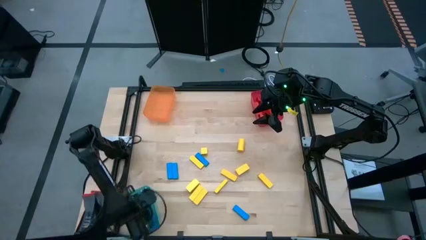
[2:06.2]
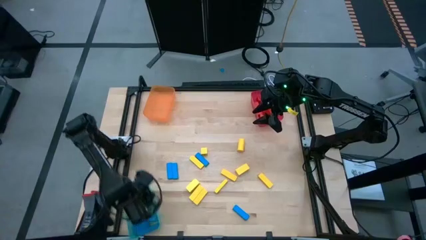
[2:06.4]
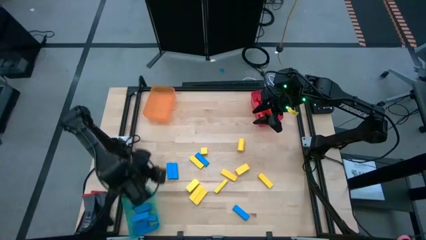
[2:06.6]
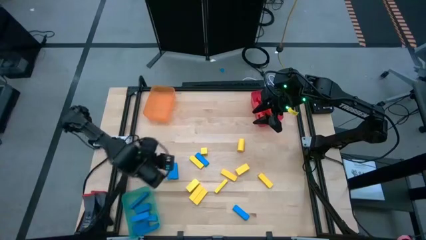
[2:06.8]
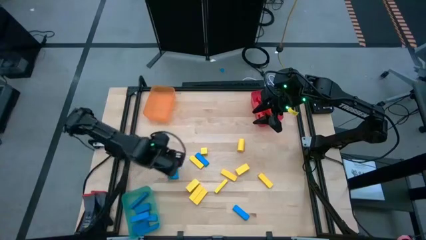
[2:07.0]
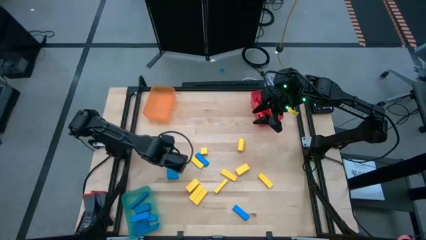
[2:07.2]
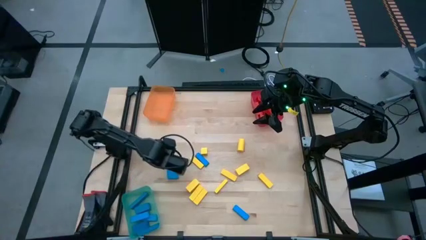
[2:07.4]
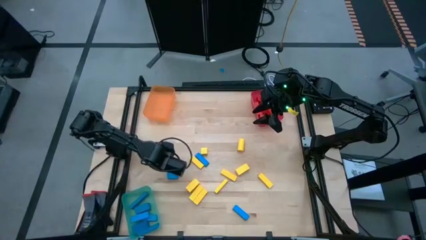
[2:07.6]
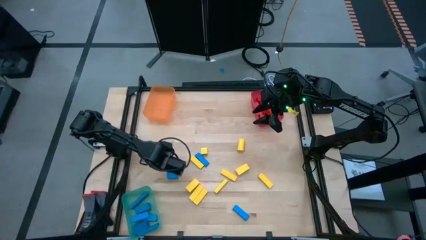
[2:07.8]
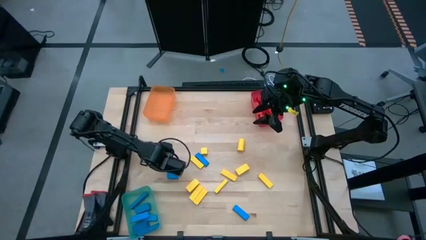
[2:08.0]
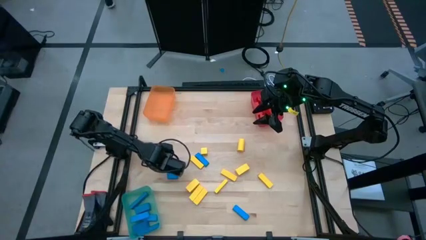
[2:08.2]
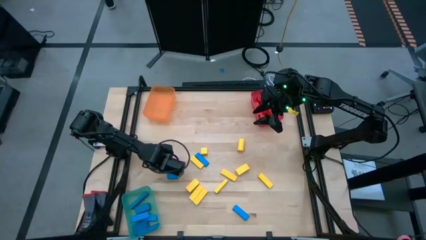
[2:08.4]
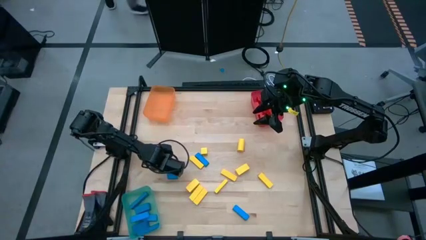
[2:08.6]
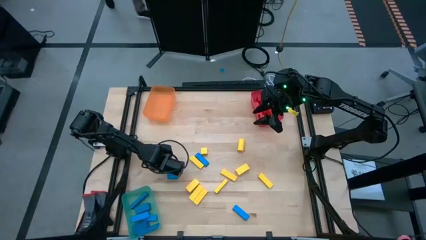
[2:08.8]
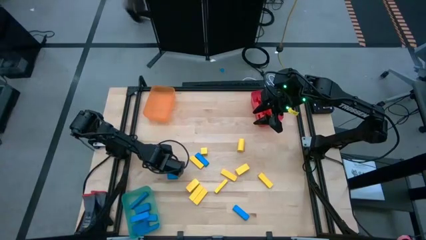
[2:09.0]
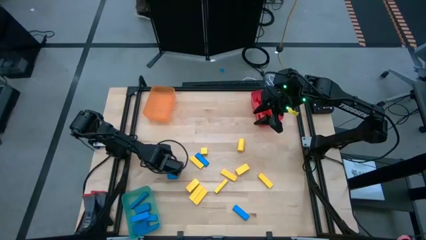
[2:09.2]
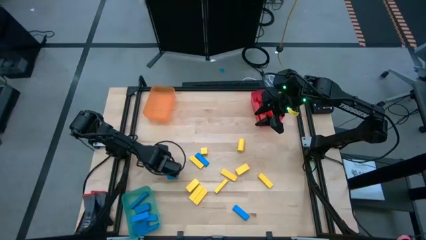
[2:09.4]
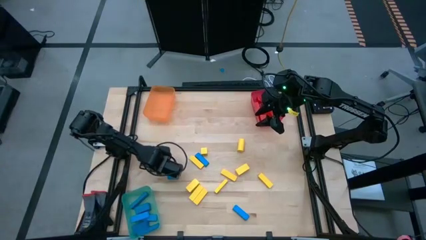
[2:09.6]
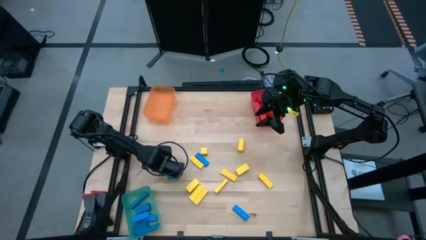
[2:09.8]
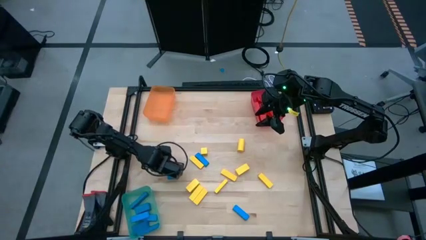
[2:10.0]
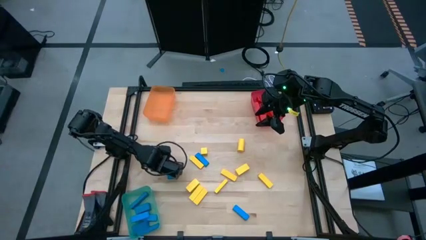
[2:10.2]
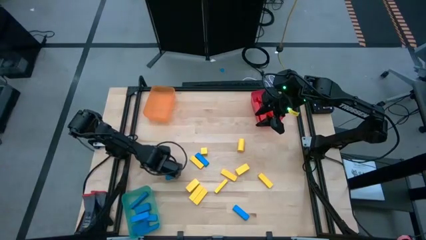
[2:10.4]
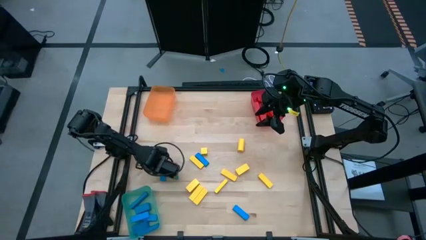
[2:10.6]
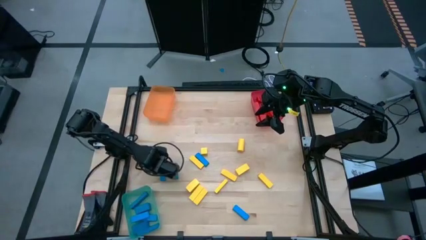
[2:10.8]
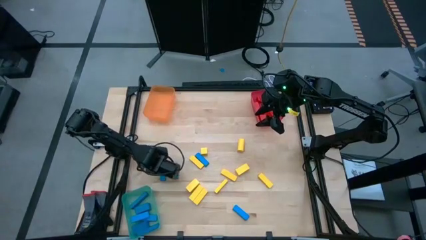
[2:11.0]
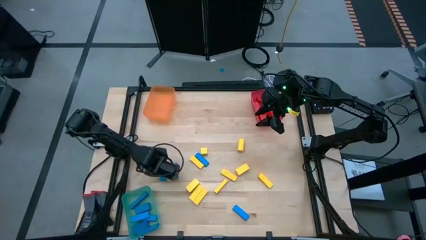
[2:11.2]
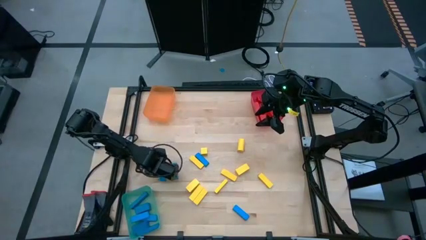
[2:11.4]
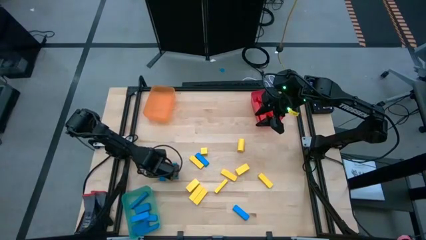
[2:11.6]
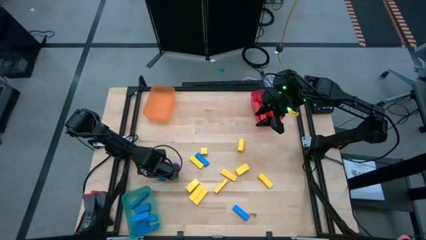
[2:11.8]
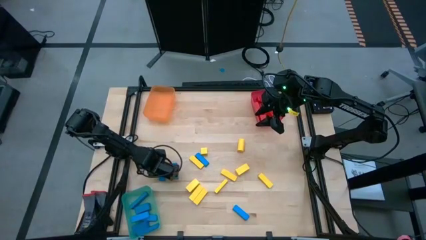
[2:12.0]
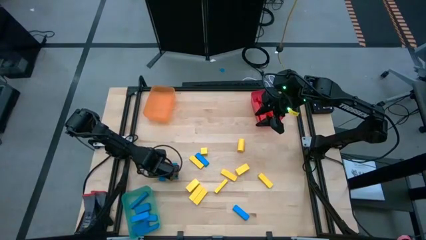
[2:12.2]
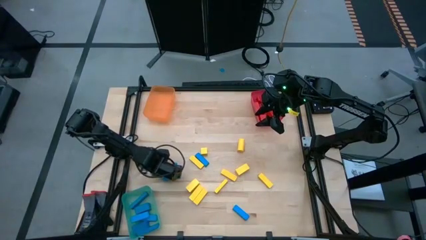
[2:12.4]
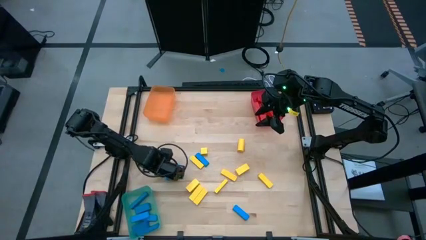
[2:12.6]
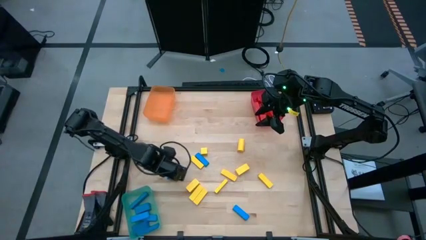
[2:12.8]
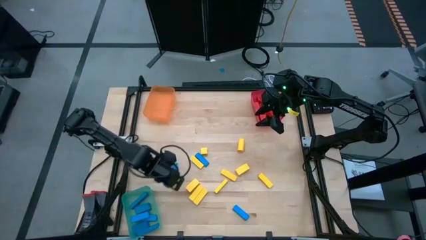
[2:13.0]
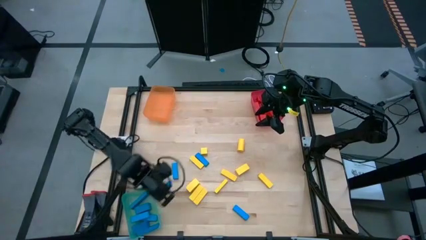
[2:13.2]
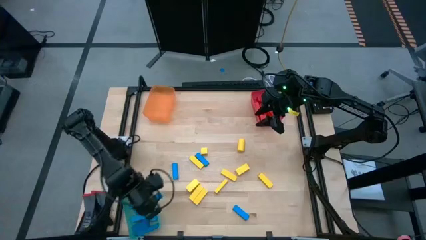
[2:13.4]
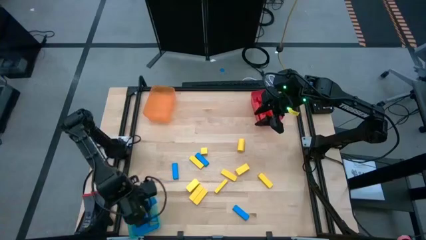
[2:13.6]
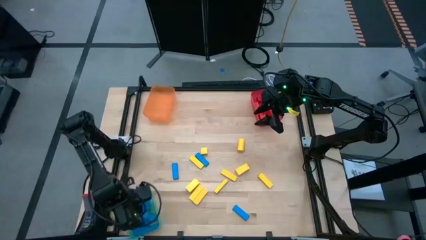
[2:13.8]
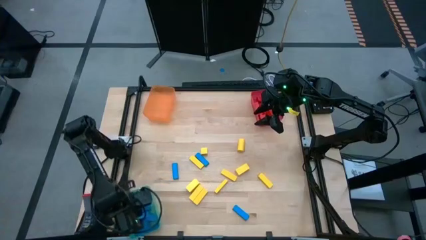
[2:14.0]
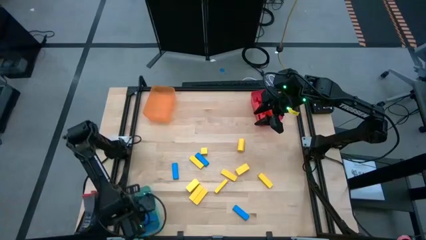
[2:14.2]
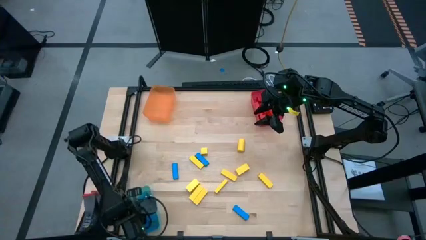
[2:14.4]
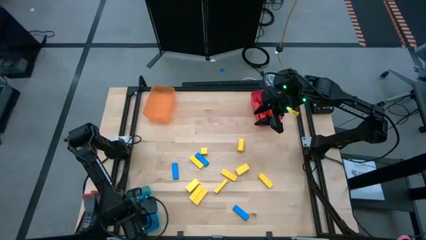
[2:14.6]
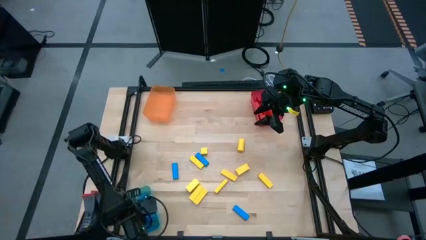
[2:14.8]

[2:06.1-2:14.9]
Task: Sort blocks
Put the blue block into the green transparent bin

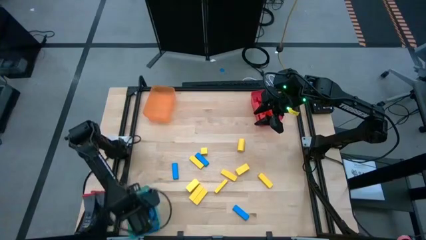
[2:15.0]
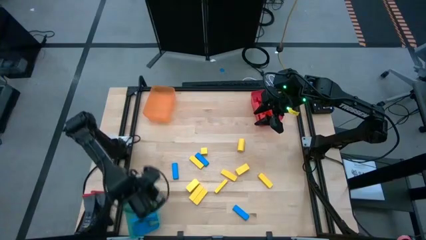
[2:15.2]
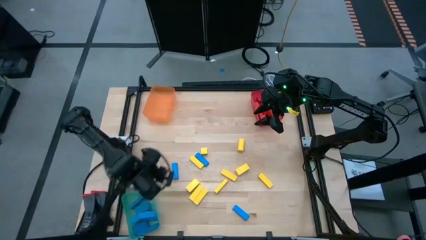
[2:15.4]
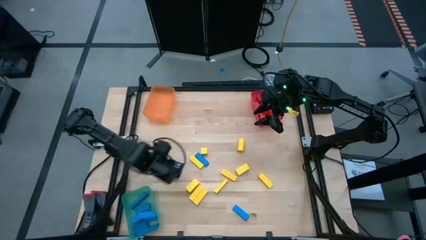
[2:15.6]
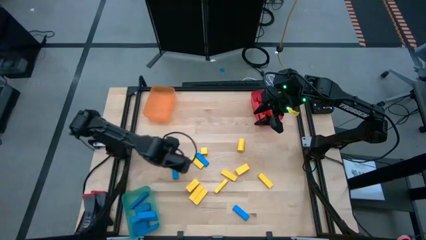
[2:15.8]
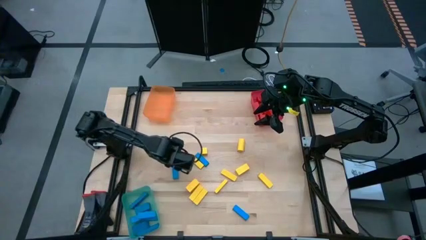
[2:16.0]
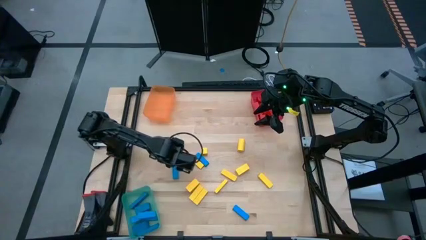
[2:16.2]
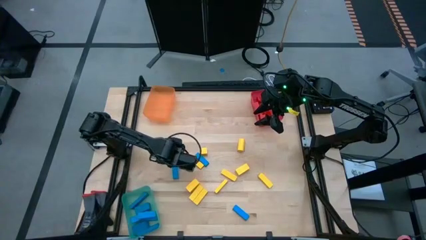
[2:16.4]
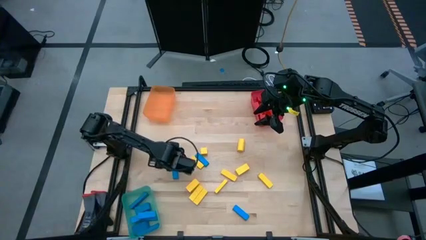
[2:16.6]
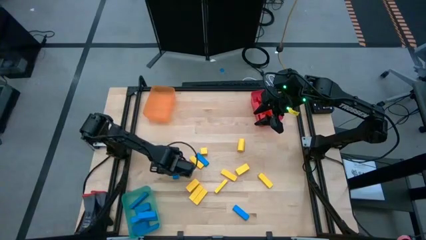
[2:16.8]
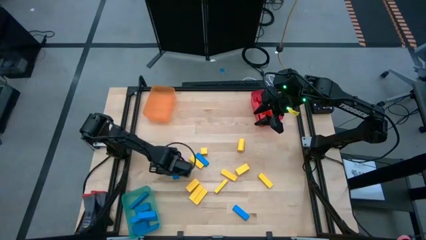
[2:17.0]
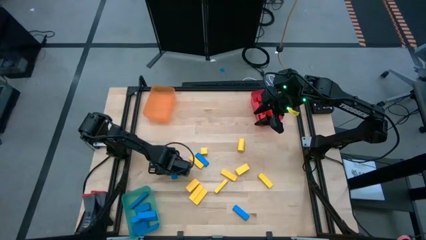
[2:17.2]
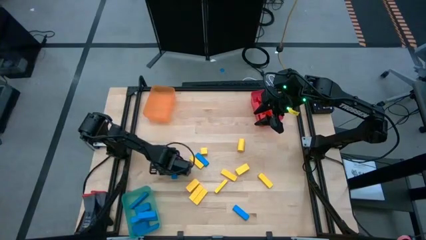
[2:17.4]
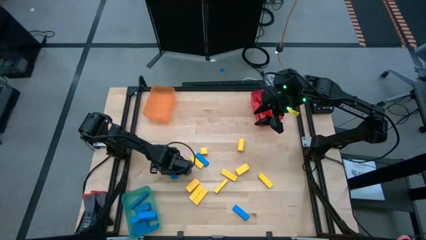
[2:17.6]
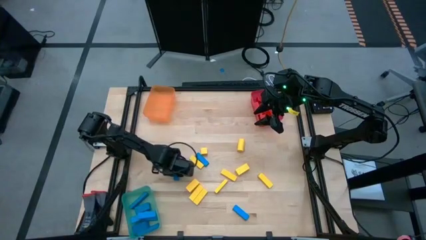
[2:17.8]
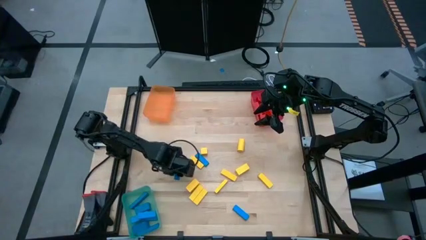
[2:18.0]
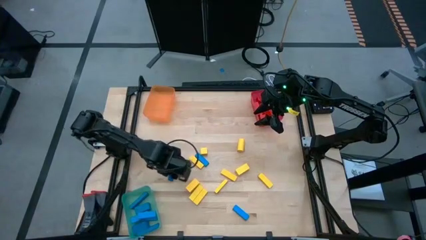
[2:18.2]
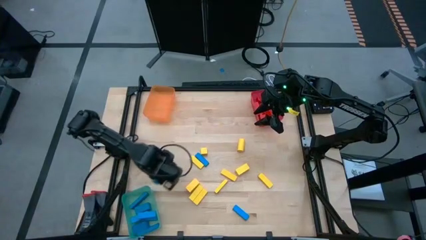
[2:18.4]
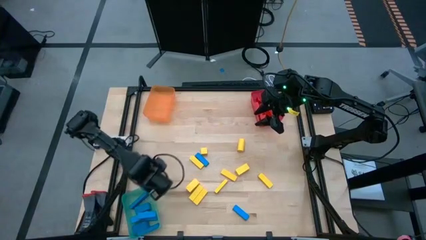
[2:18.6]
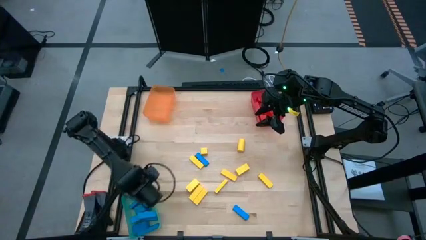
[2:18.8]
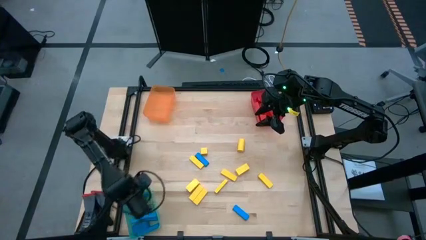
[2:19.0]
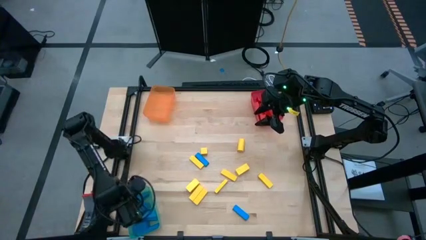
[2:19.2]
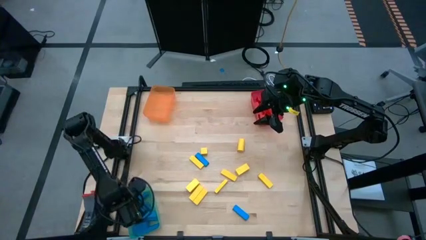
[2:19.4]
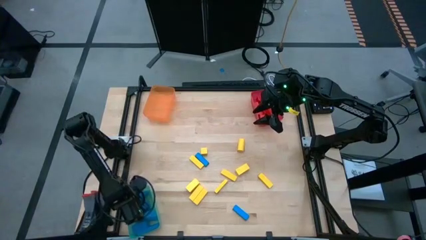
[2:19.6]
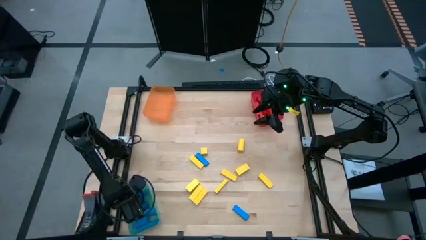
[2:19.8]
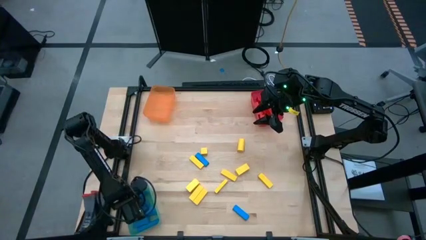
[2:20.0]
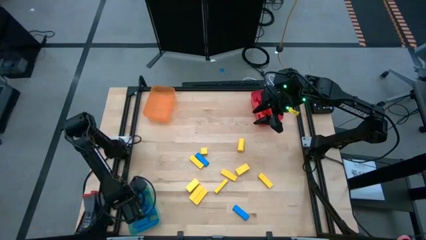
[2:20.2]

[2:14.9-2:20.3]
Put the blue block into the green transparent bin
